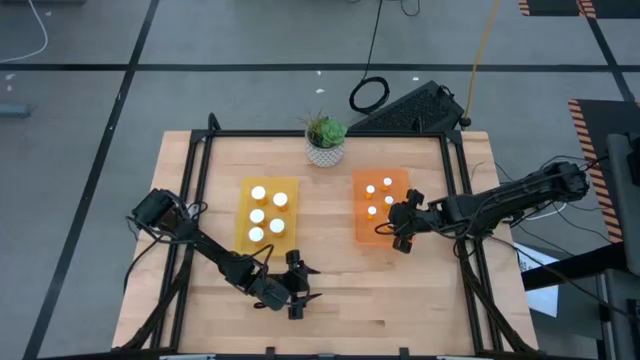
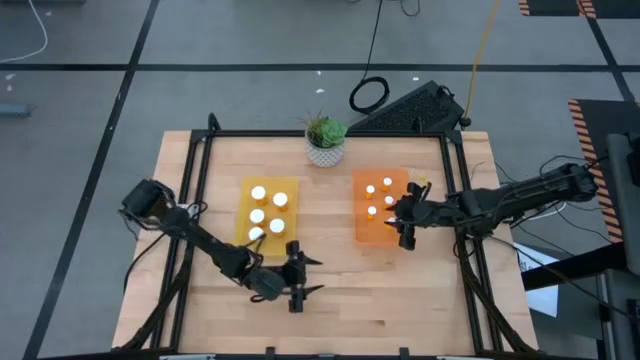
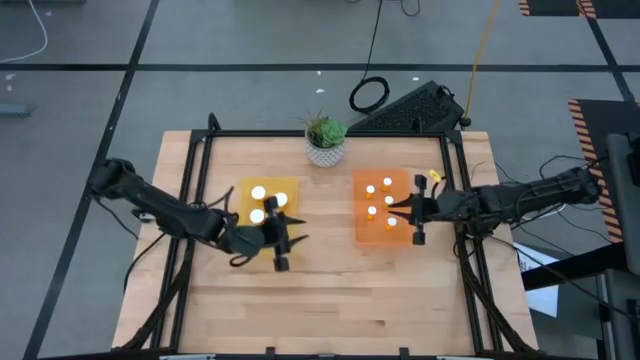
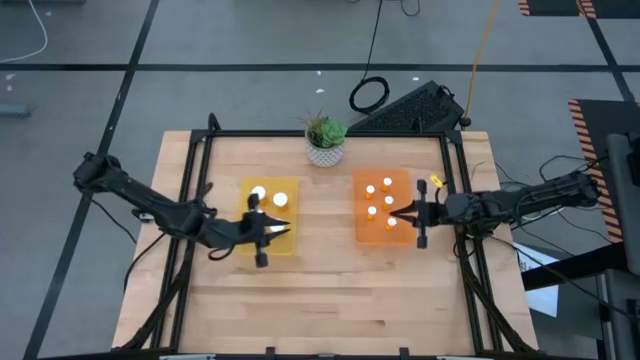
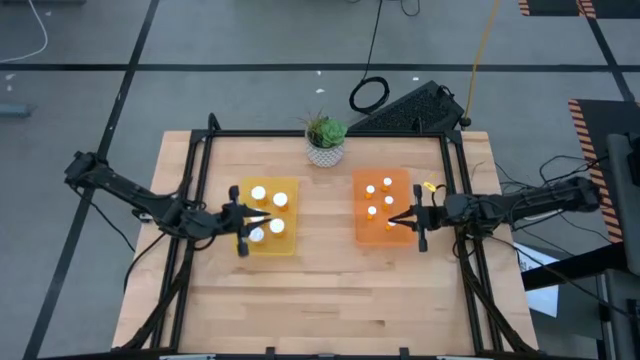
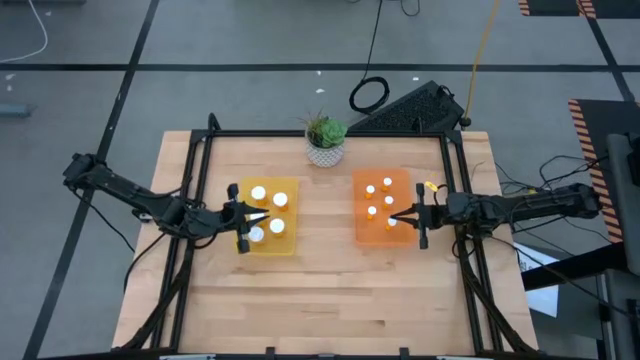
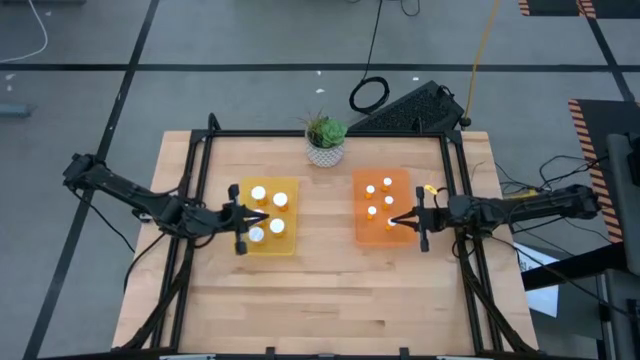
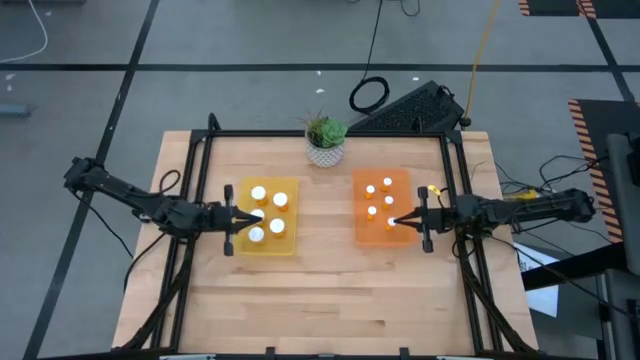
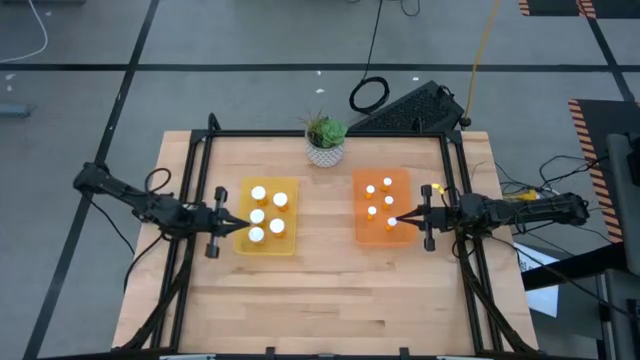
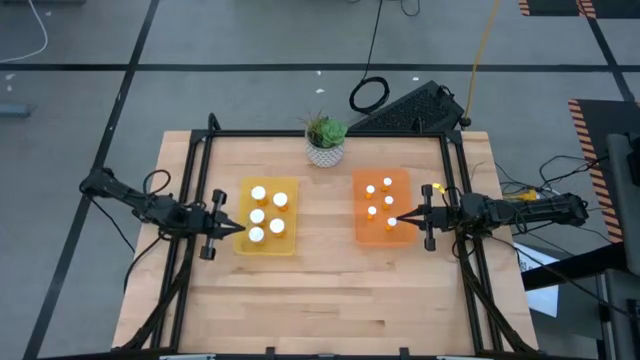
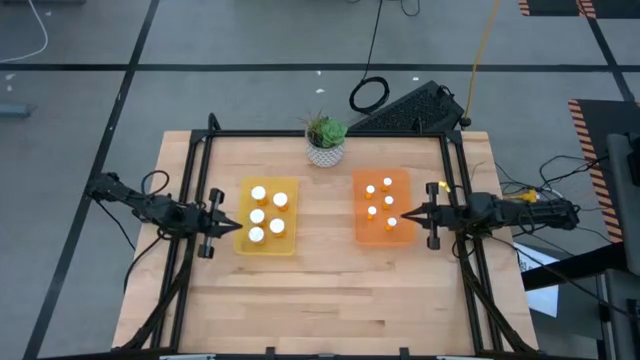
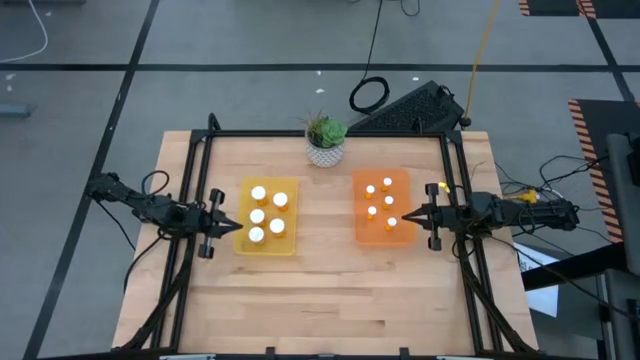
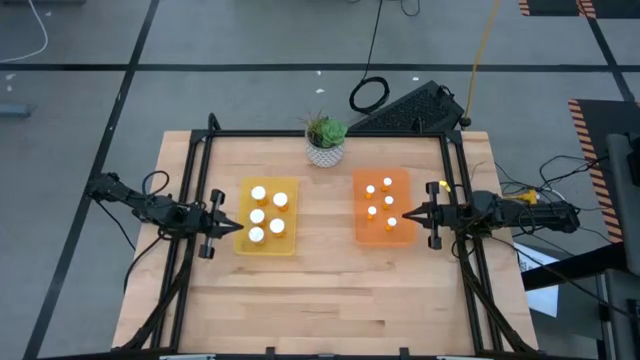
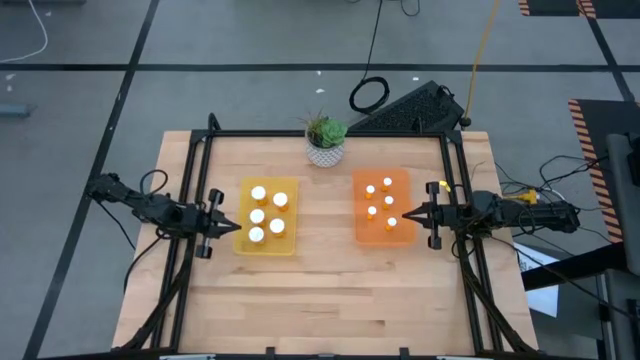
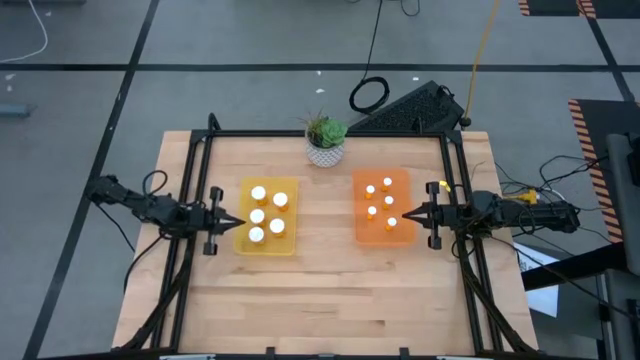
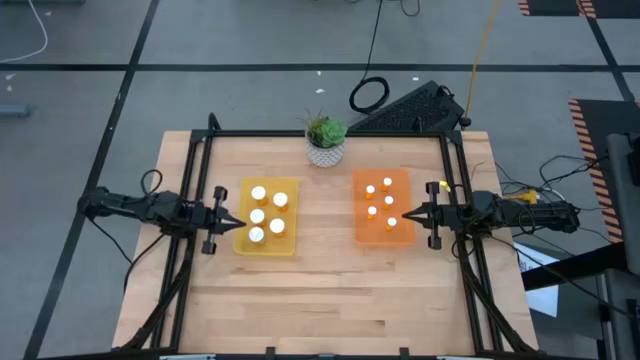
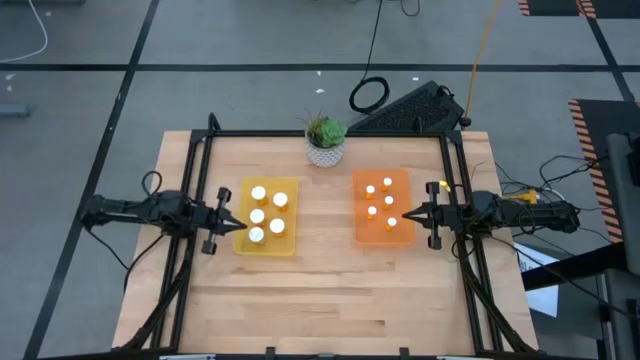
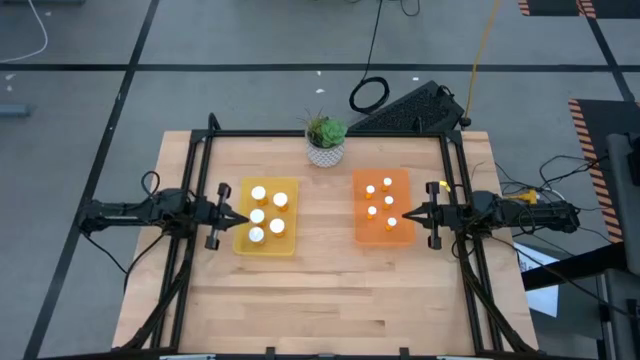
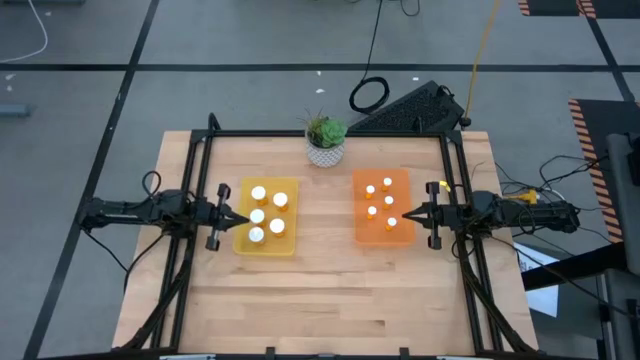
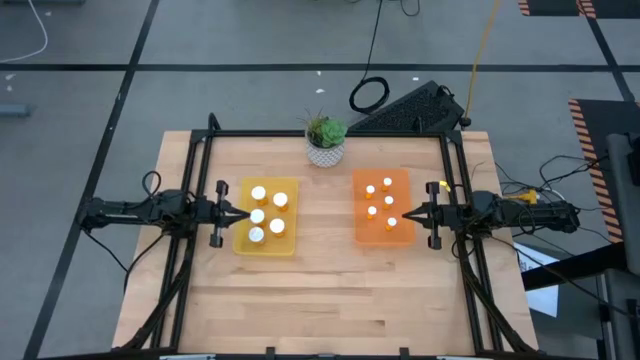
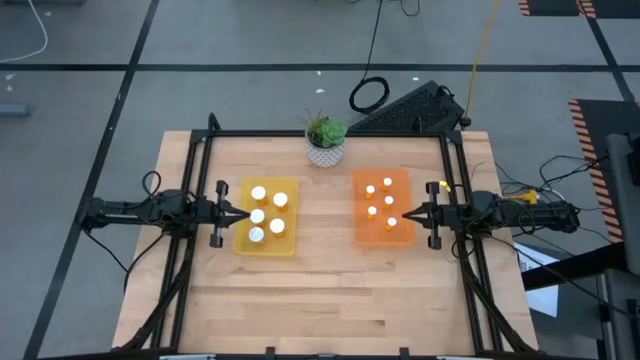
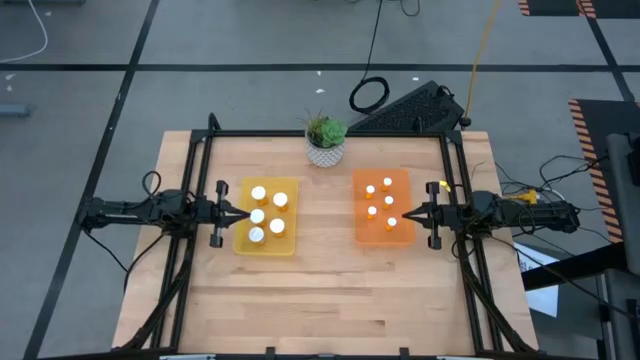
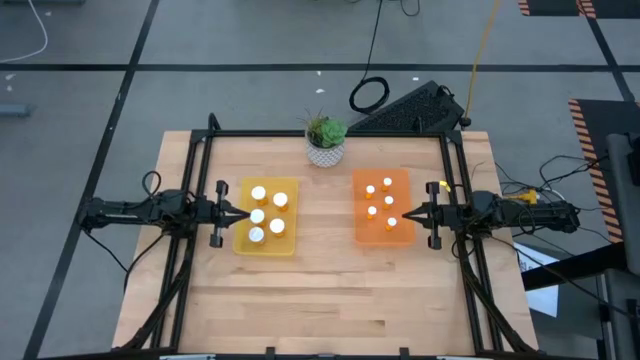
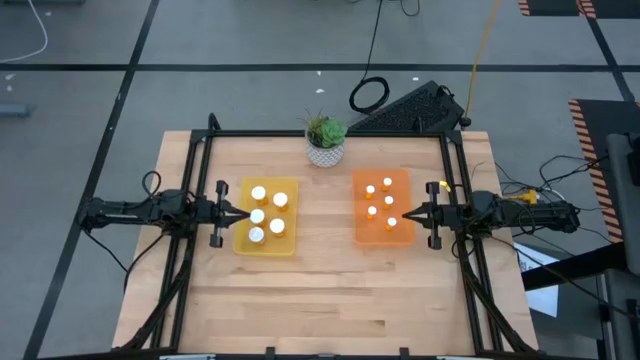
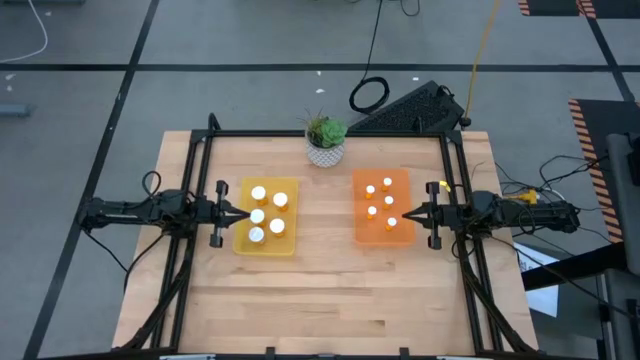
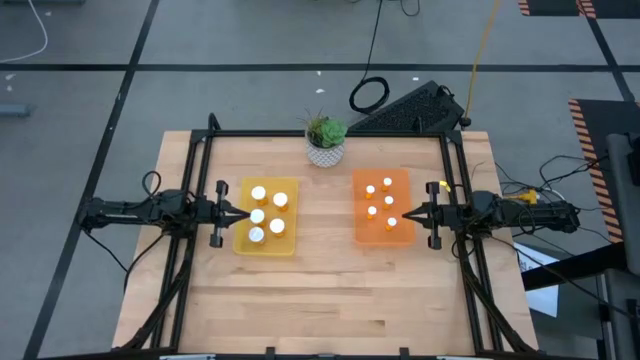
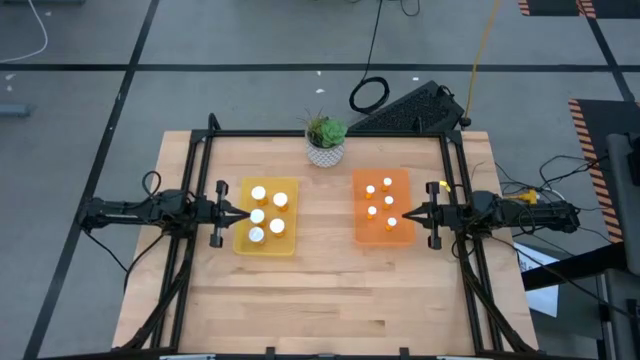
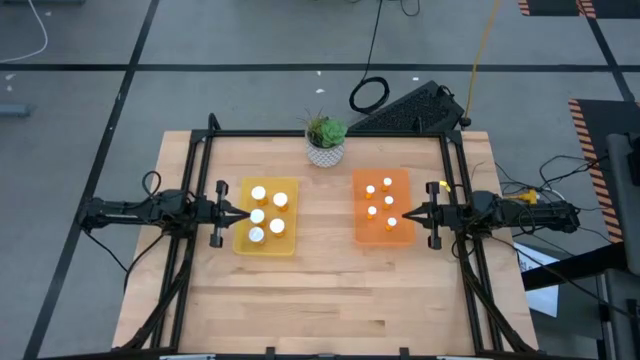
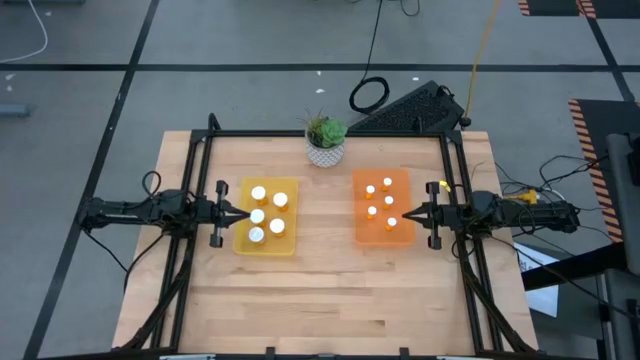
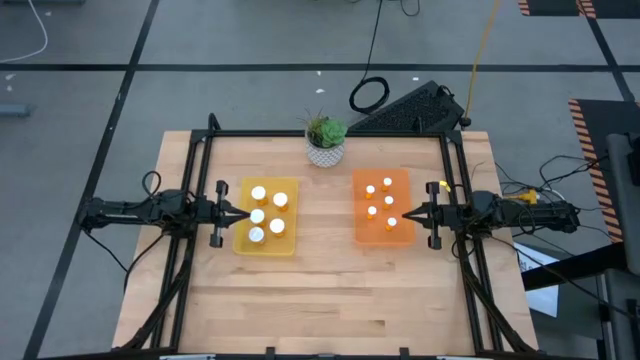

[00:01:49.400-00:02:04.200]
Task: Pick and place medicine bottles into bin by pill shape (circle, oval)
Return to Home Position

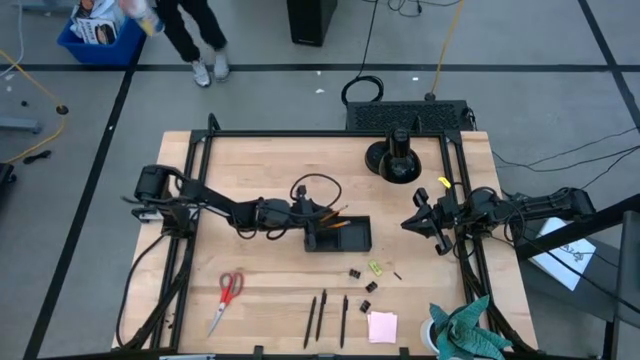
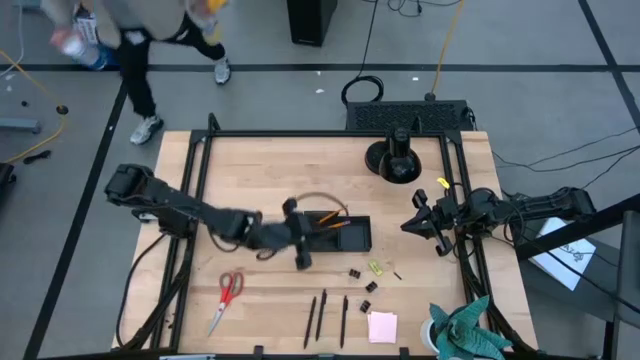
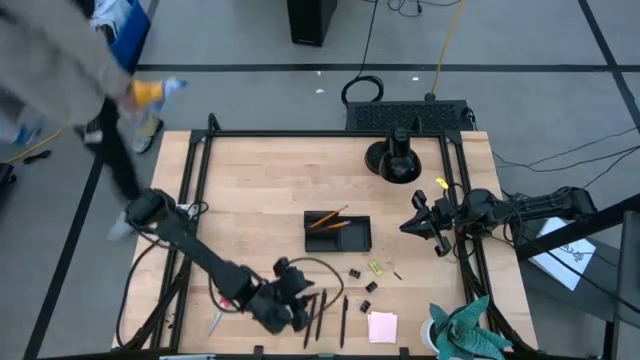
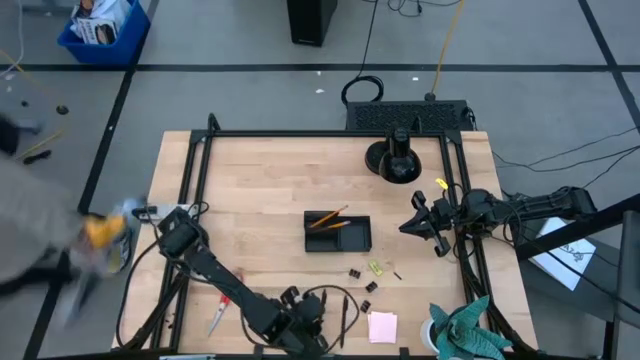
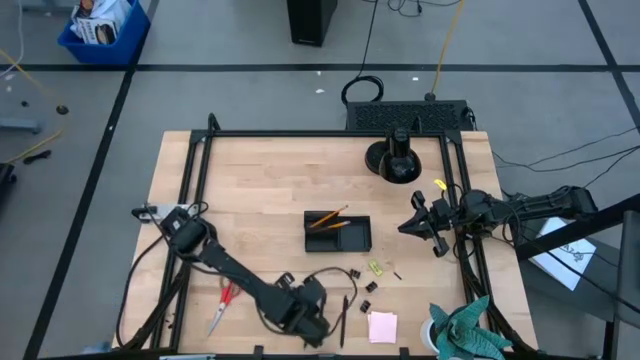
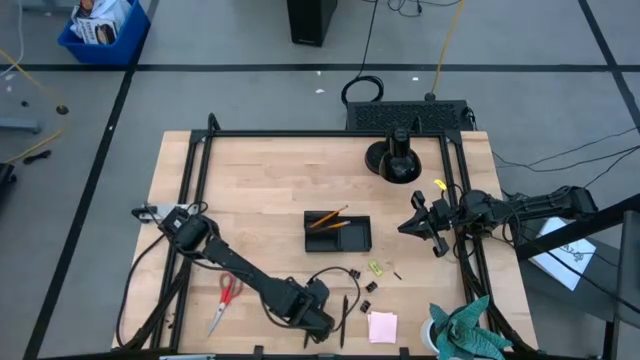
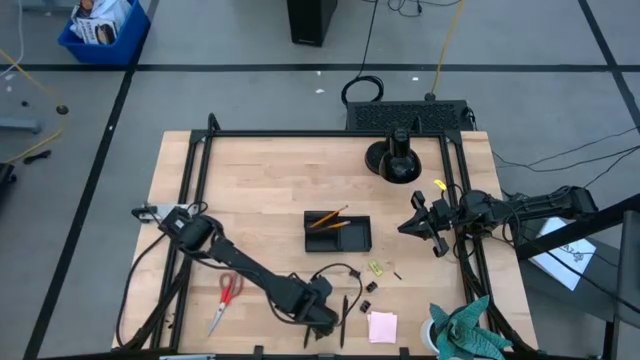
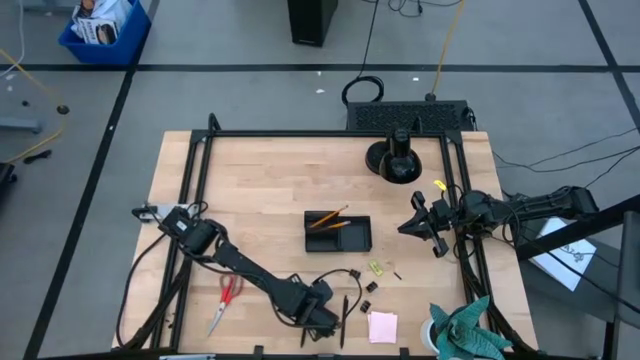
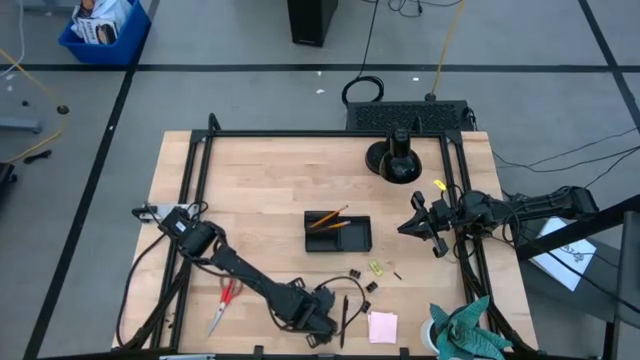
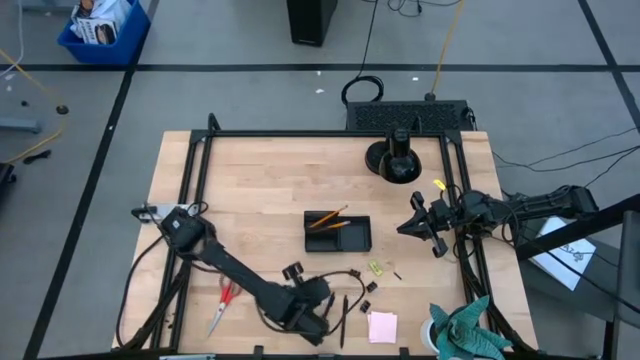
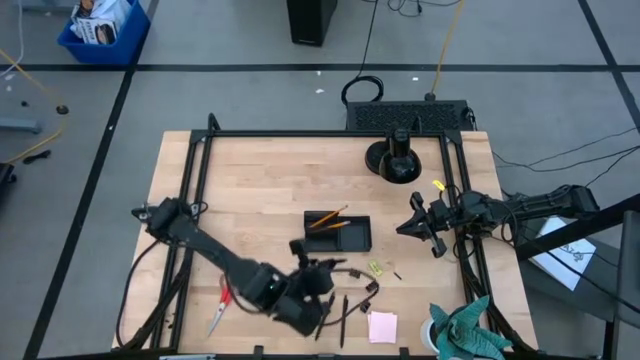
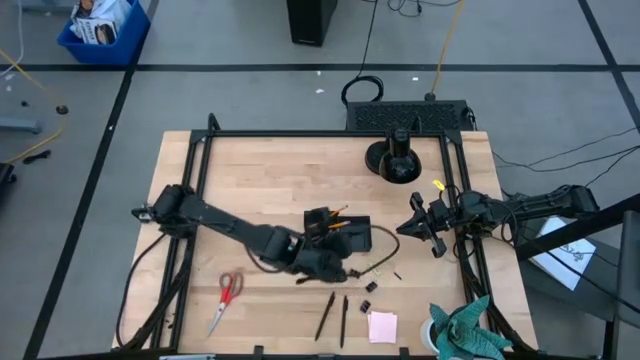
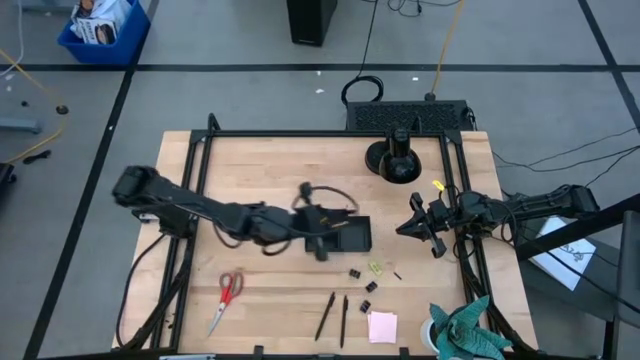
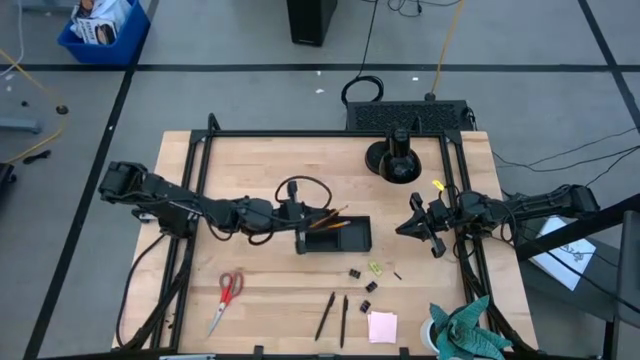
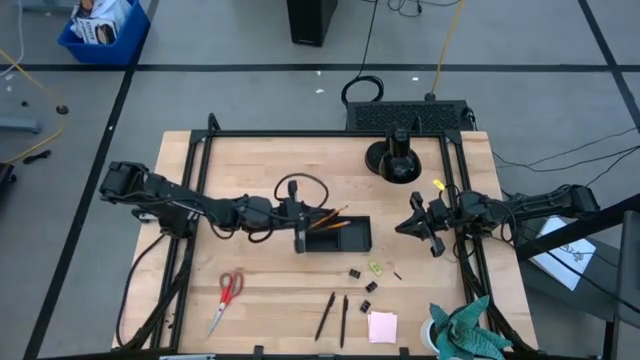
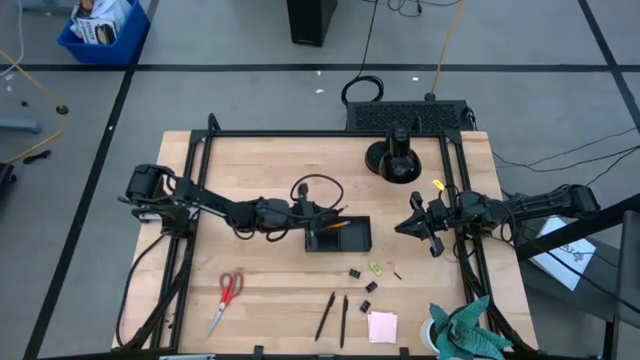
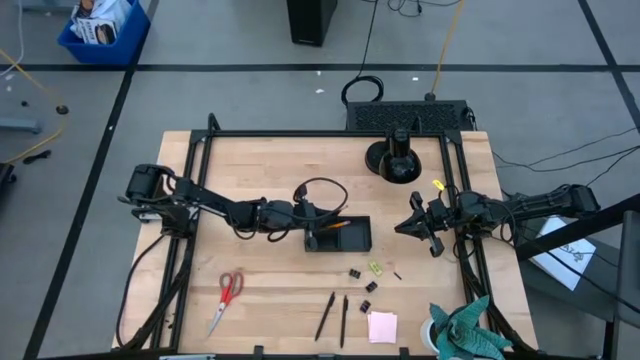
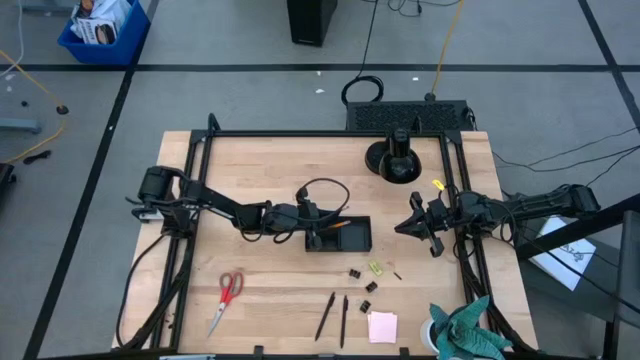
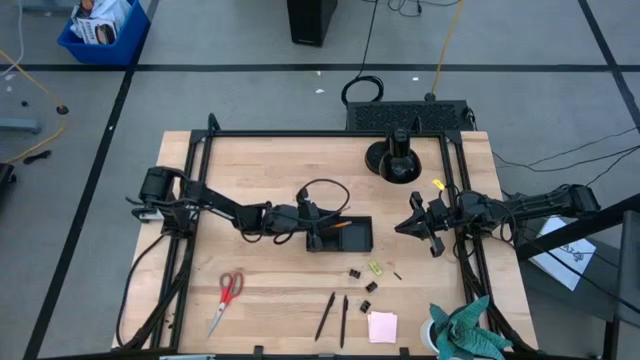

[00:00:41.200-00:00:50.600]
Task: Pick and place office supplies into organizer
Put the black pen into the black desk organizer
